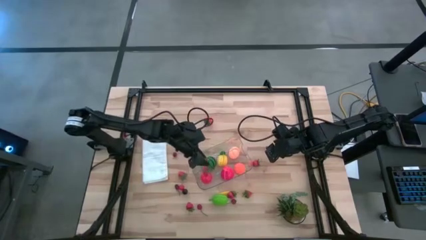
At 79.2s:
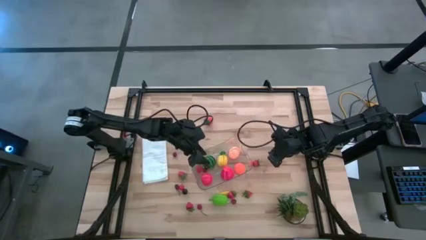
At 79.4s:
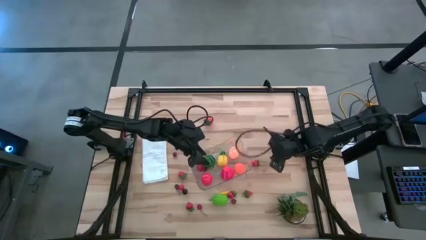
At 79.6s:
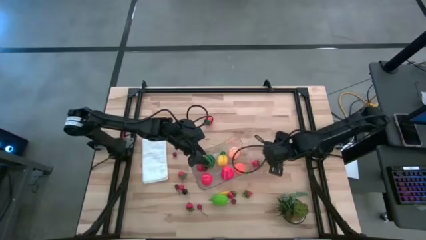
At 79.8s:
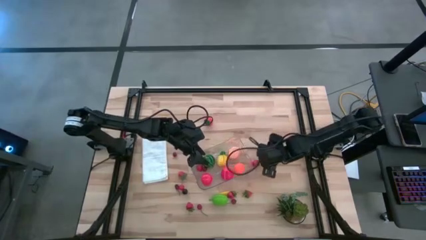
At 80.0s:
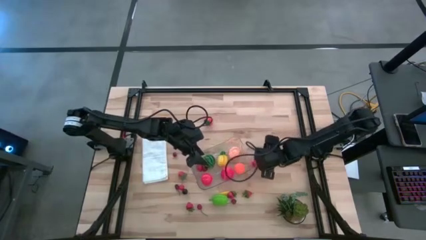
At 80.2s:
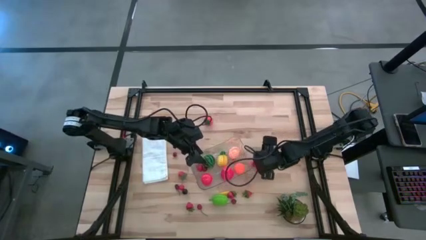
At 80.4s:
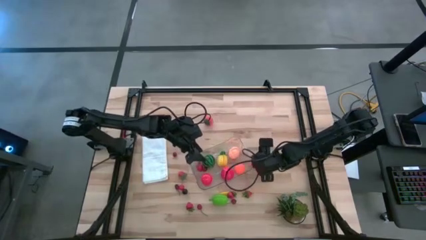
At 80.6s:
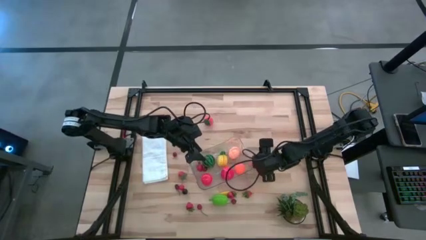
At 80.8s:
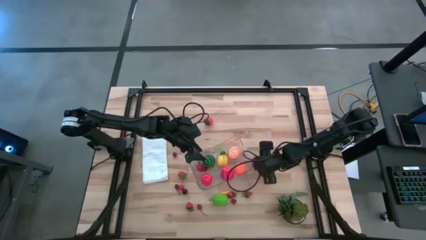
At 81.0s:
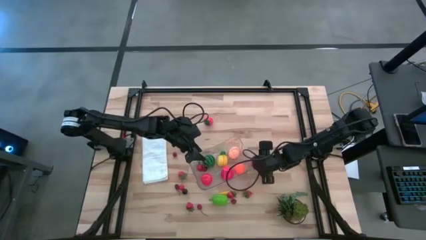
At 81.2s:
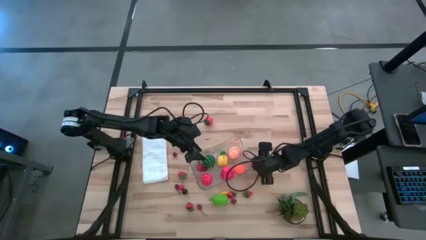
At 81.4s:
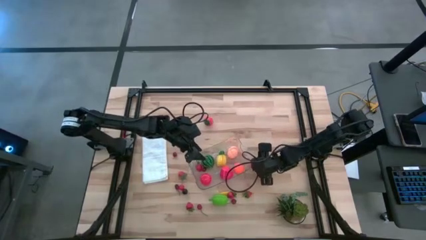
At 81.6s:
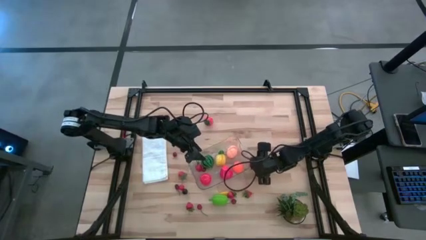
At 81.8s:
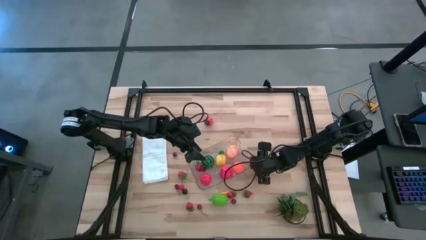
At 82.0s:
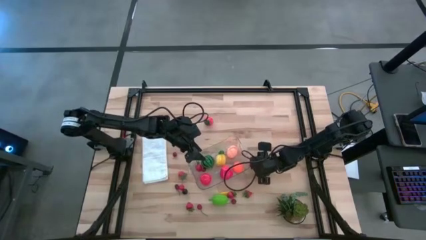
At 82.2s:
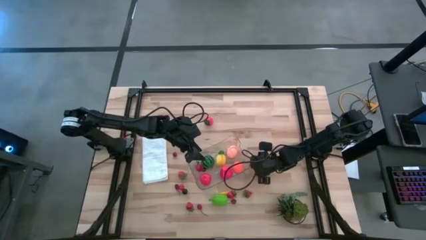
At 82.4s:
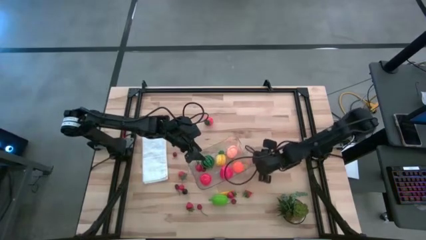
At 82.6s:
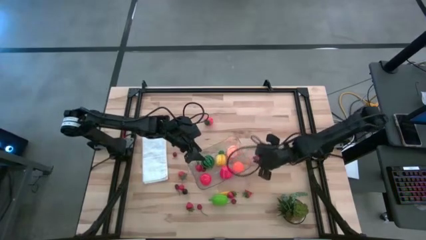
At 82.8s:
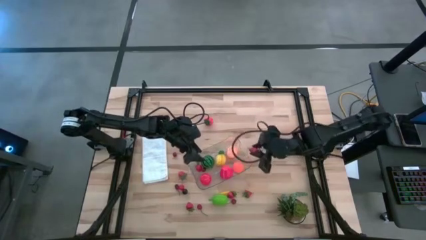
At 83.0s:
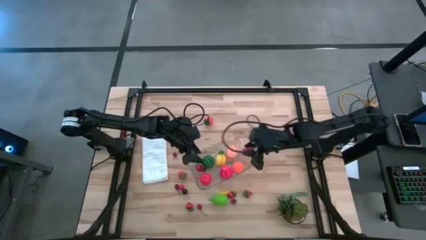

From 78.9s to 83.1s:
Task: Pick and placing Produce into tupperware
Put the strawberry into the transparent bin

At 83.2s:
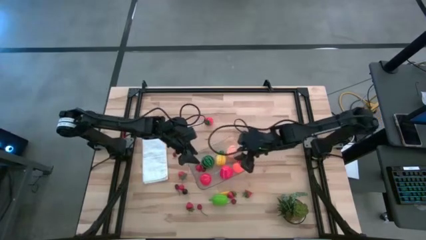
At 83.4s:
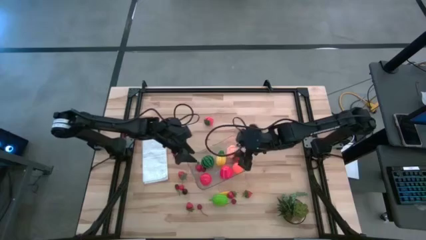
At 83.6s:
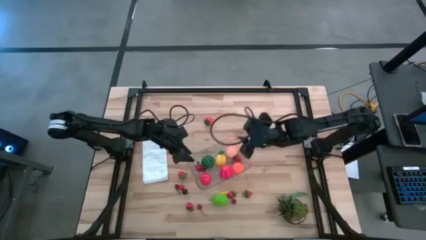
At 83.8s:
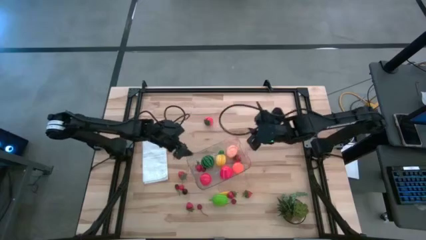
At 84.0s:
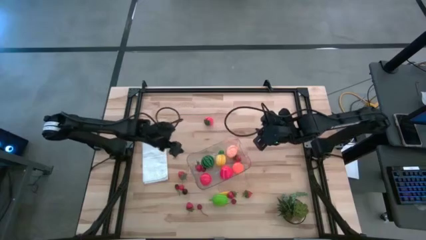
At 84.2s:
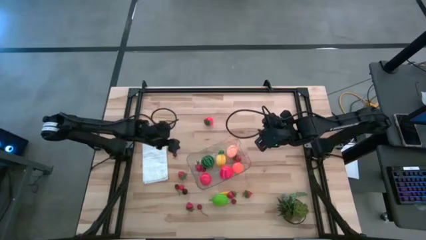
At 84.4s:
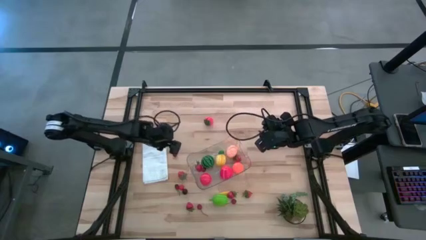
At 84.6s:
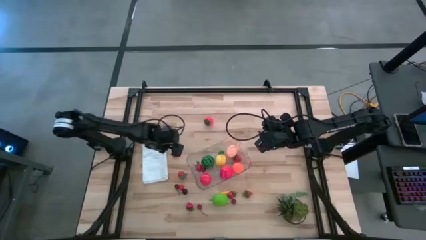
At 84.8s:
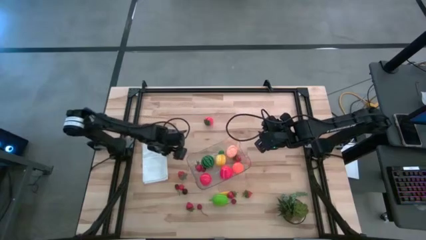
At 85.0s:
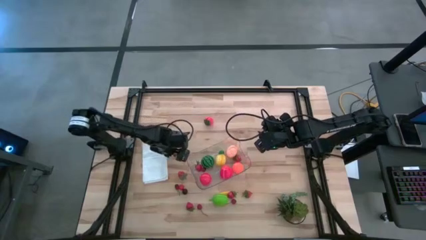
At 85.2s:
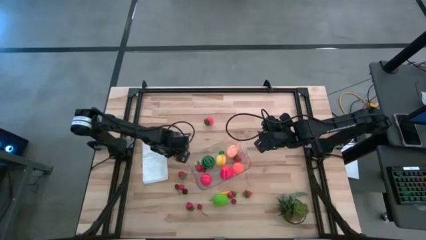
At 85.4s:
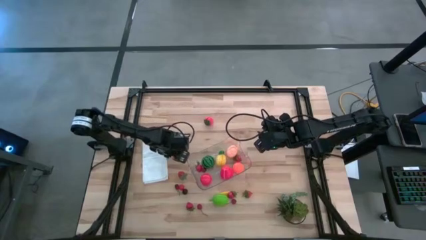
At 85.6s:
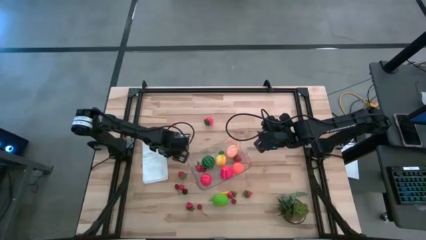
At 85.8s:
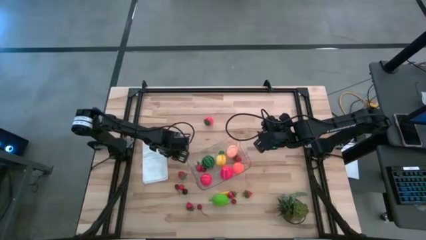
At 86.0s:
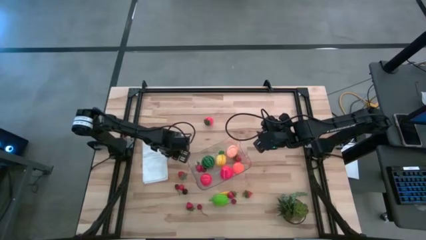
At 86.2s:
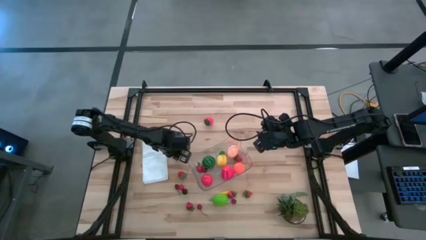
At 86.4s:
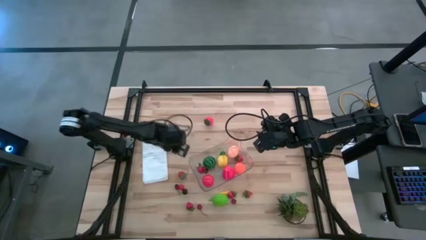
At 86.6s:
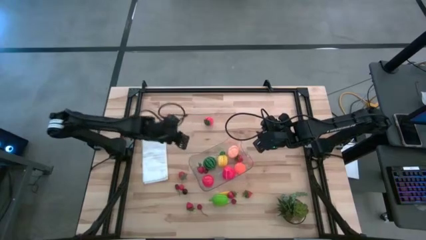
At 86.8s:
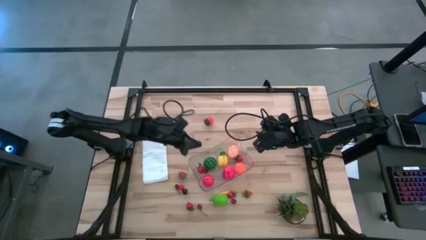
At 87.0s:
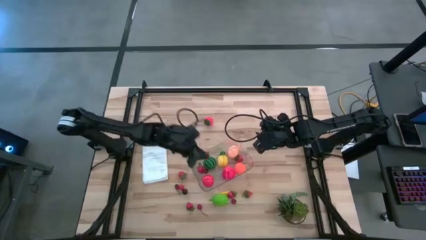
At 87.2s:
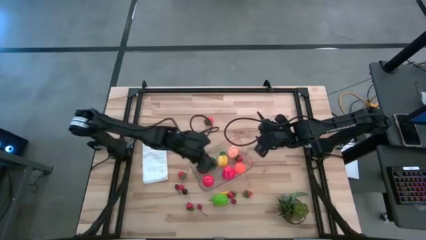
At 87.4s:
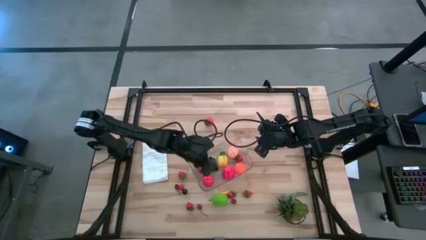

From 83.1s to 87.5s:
Put the dark red cherry into the transparent bin

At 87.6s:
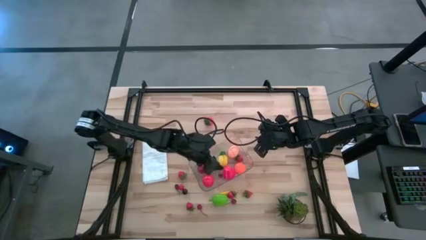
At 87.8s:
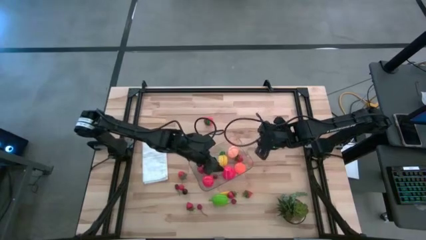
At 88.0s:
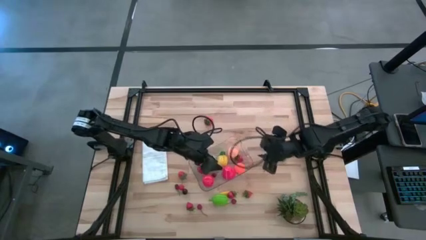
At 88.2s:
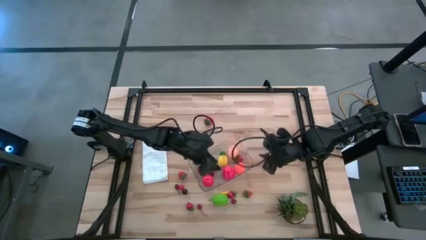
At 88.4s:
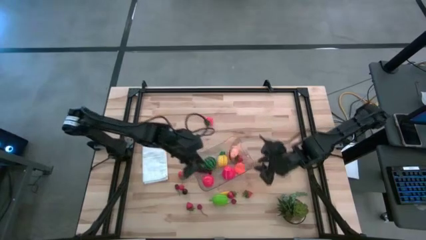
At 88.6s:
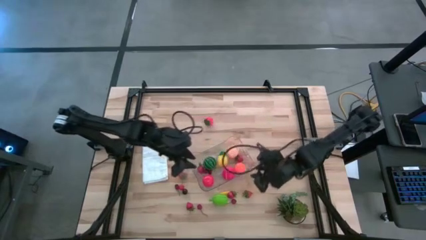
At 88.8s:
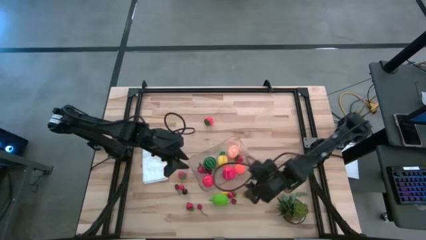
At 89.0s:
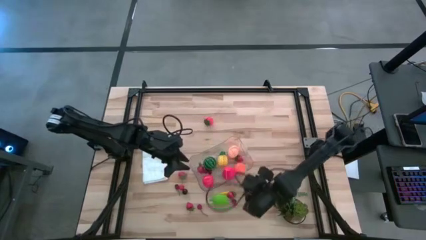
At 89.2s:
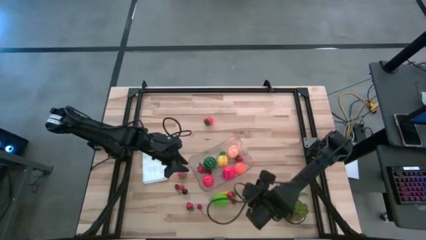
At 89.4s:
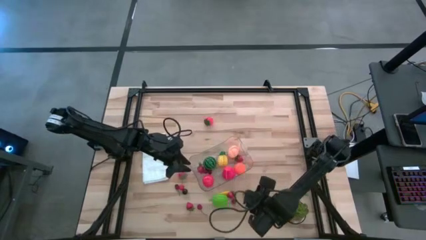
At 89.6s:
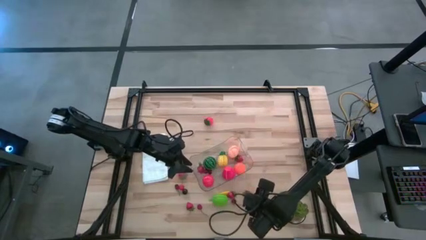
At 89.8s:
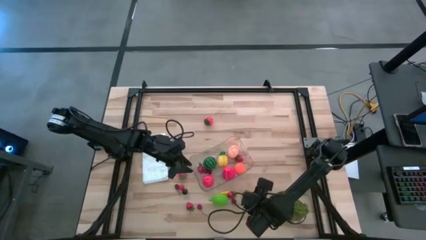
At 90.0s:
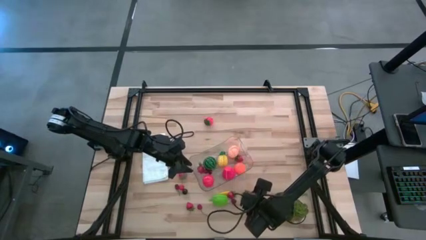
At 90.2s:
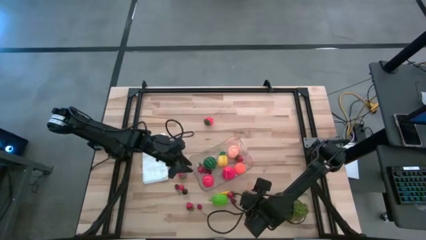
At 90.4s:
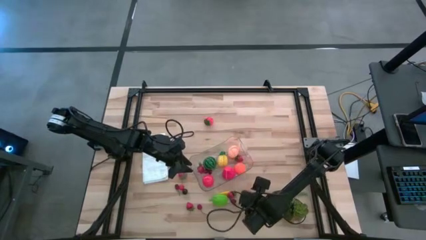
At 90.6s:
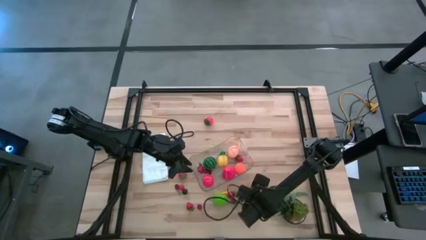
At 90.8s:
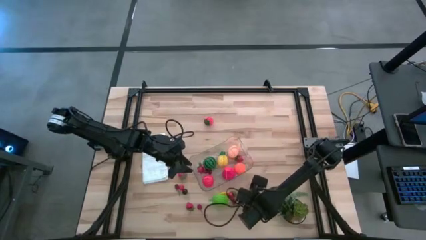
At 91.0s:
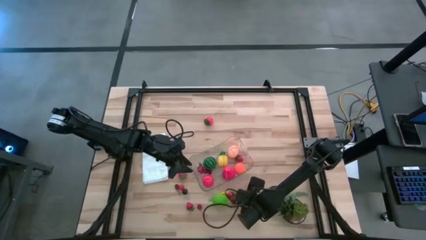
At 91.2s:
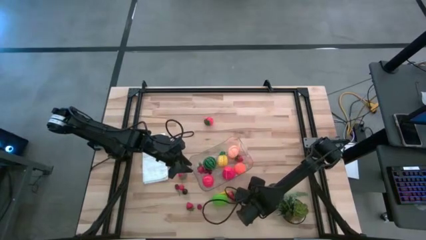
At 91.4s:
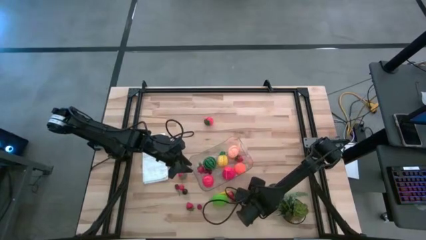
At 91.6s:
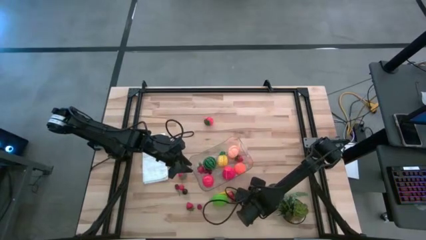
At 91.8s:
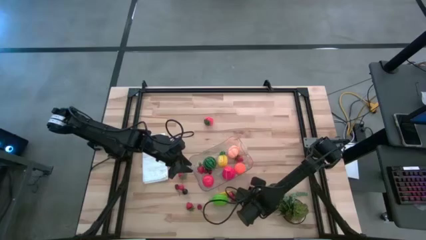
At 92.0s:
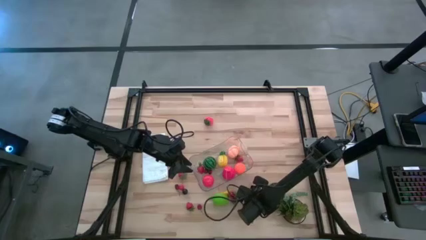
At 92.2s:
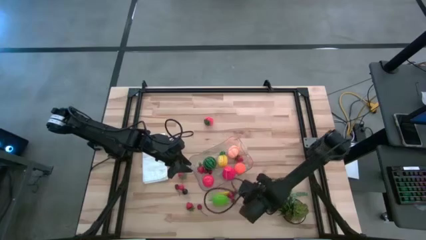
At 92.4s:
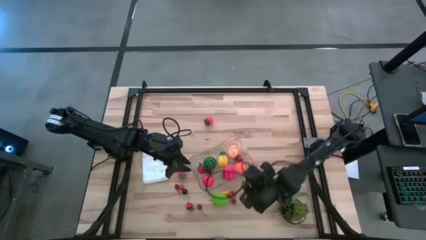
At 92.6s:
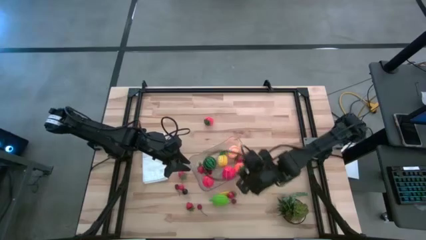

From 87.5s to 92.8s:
Put the strawberry into the transparent bin

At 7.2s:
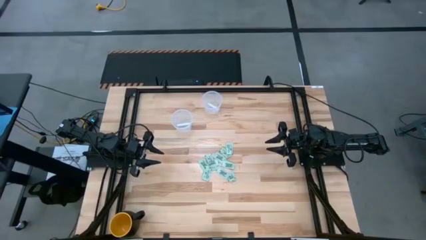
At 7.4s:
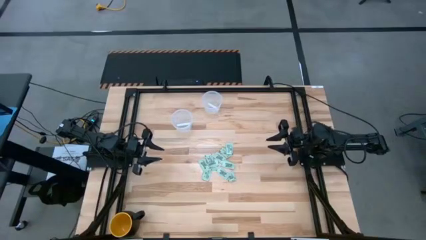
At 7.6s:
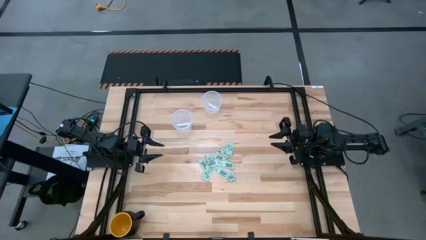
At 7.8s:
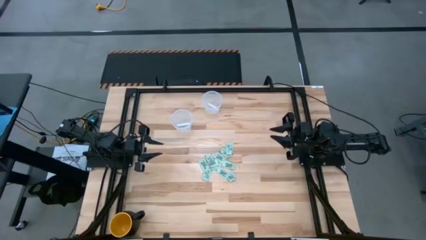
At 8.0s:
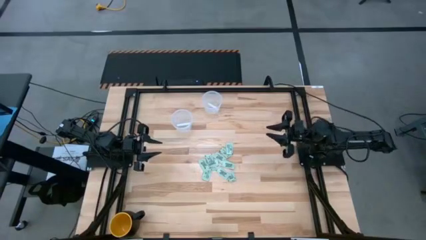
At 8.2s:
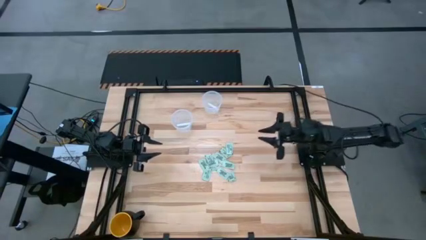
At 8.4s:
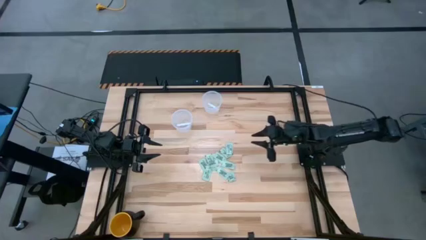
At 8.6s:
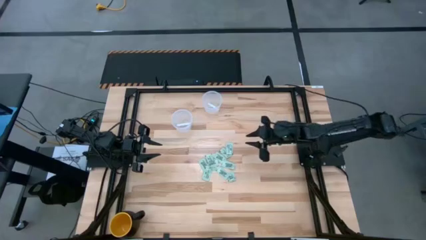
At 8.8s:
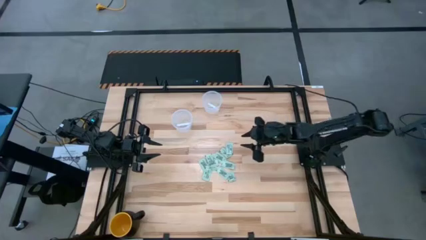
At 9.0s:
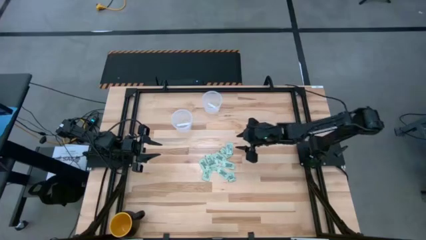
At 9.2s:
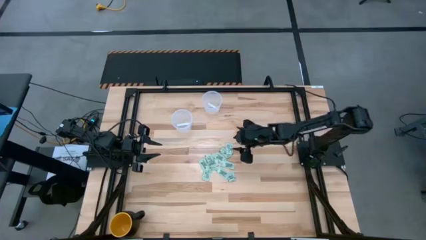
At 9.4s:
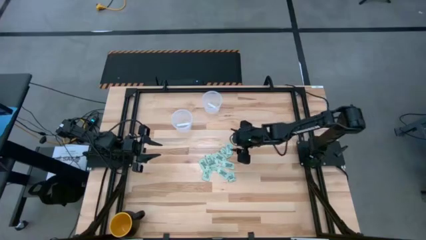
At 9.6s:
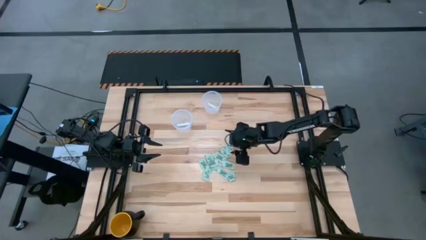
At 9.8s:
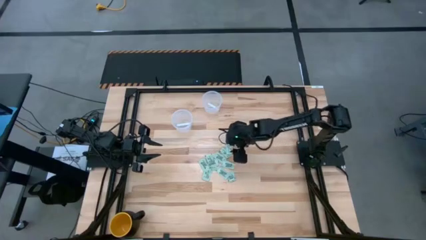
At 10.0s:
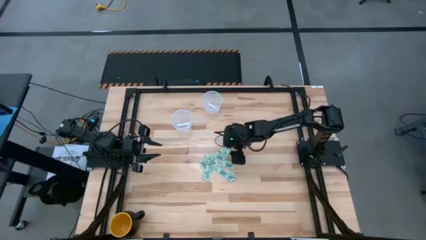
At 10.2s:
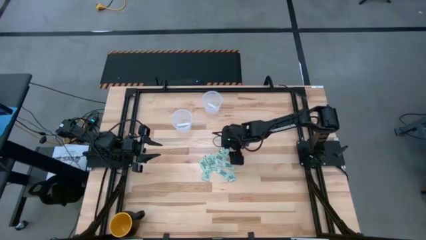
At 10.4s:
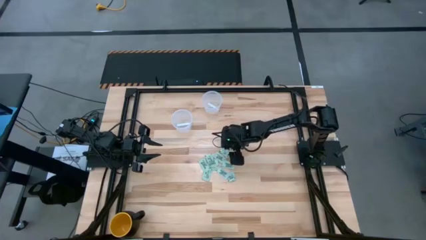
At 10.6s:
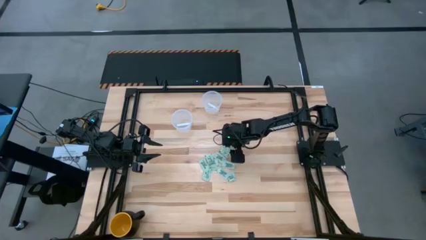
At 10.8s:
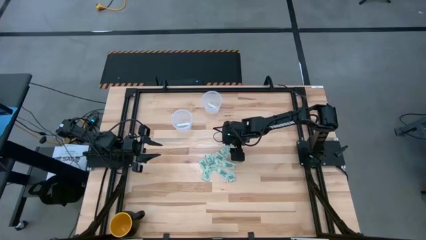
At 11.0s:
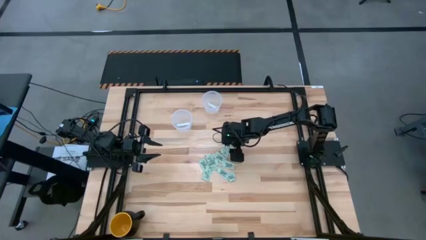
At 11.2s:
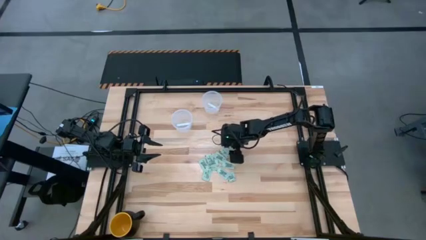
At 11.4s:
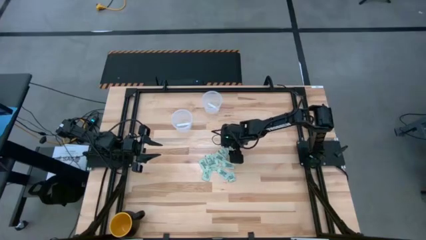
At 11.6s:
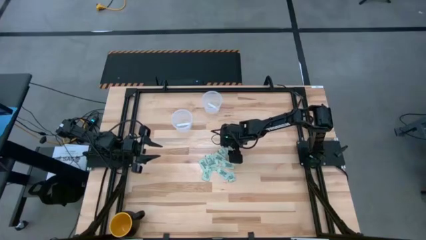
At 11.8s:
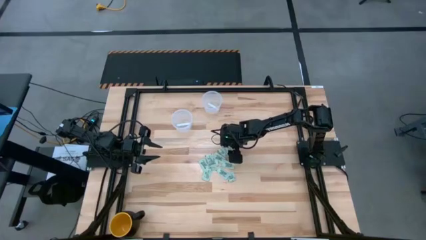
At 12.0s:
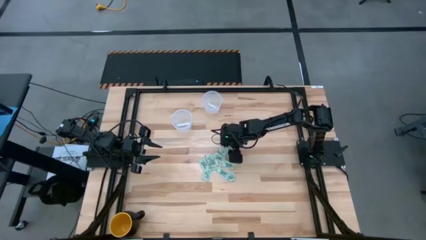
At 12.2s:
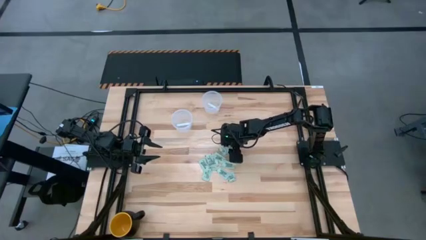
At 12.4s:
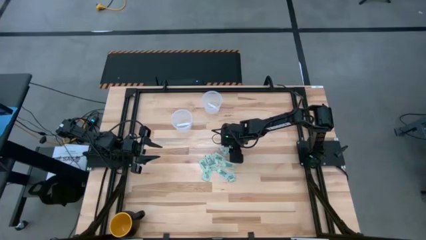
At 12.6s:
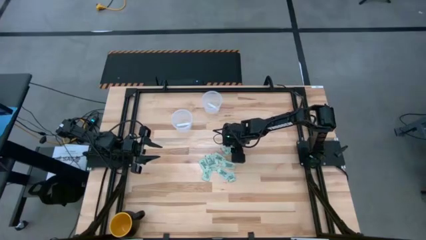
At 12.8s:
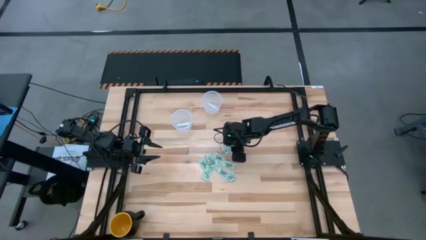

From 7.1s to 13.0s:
Task: Pick and place items into bin
Put the stevia packet into the top transparent bin
